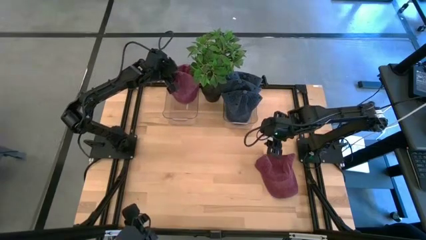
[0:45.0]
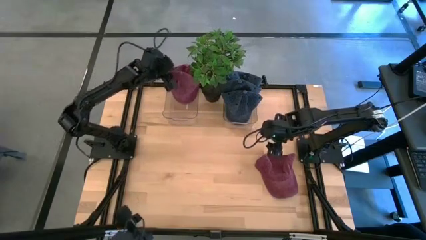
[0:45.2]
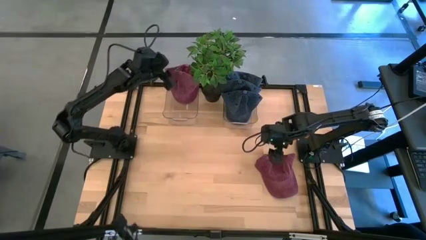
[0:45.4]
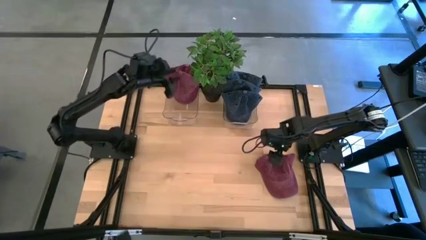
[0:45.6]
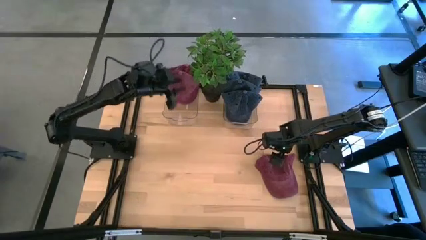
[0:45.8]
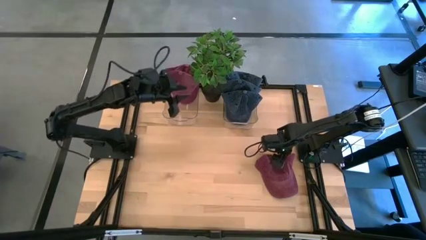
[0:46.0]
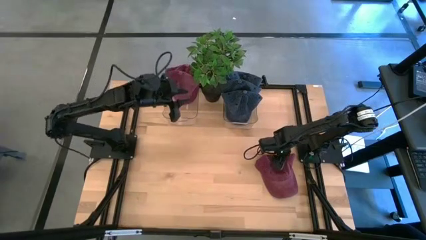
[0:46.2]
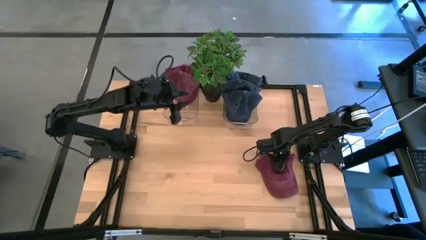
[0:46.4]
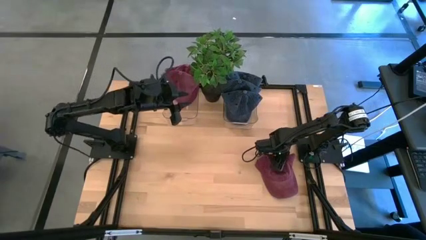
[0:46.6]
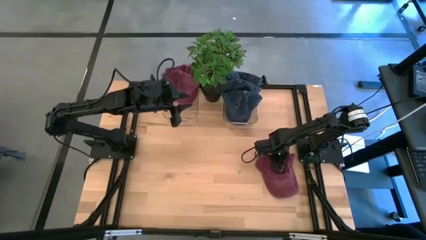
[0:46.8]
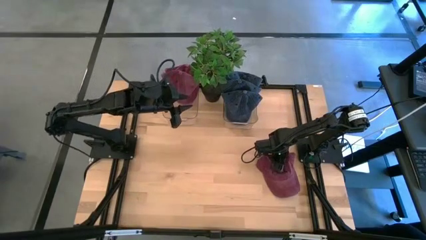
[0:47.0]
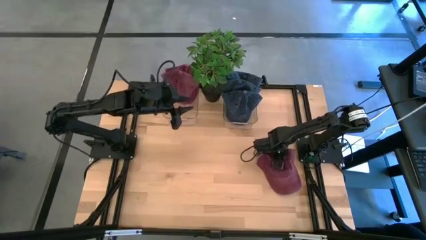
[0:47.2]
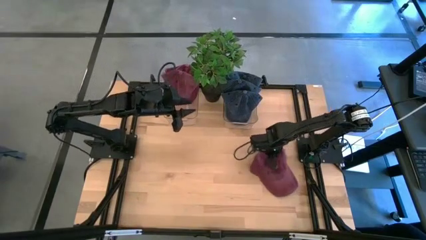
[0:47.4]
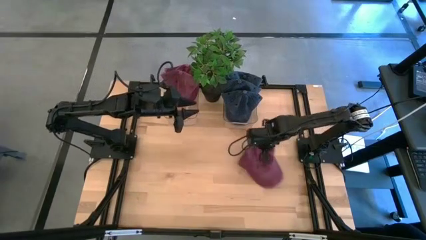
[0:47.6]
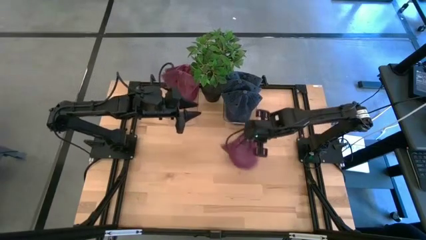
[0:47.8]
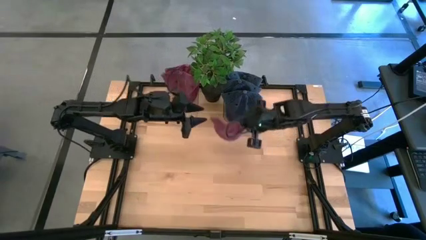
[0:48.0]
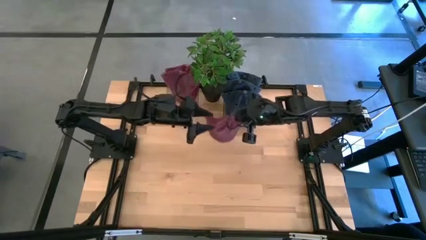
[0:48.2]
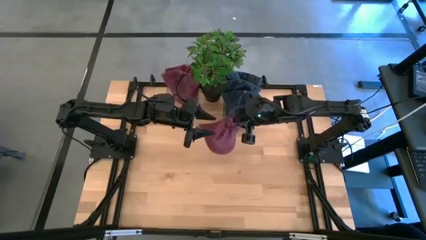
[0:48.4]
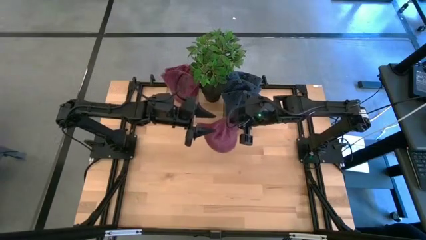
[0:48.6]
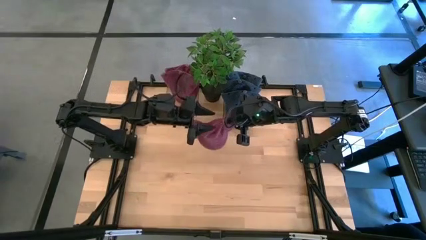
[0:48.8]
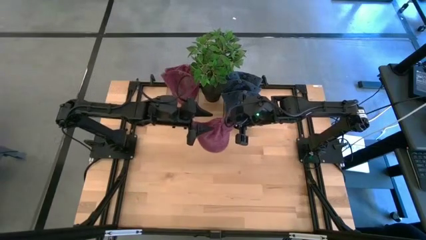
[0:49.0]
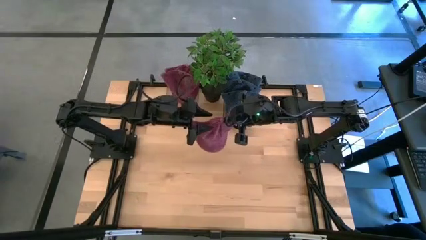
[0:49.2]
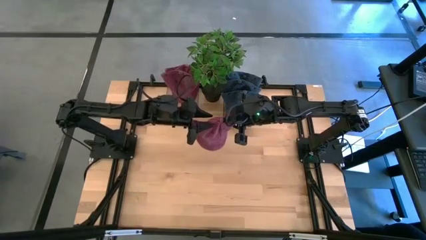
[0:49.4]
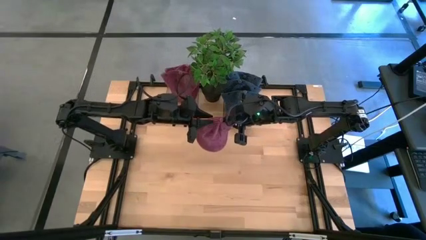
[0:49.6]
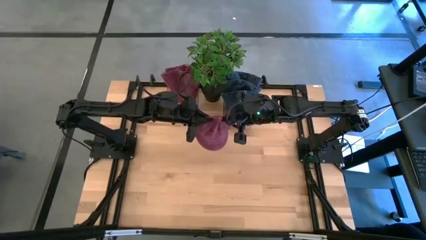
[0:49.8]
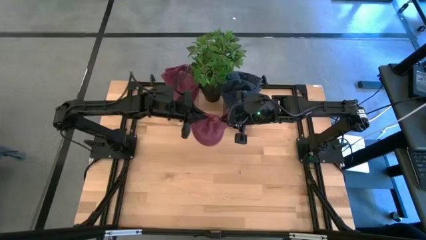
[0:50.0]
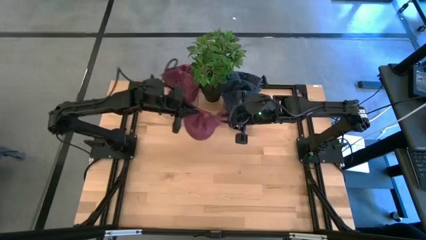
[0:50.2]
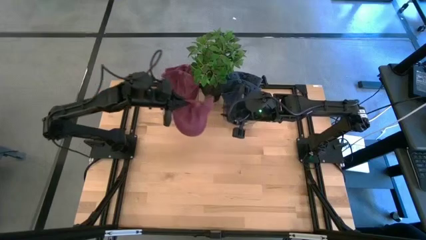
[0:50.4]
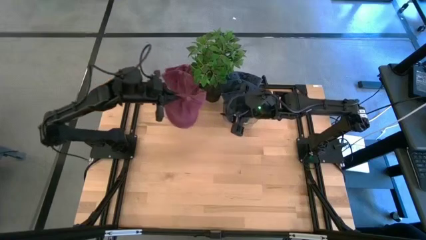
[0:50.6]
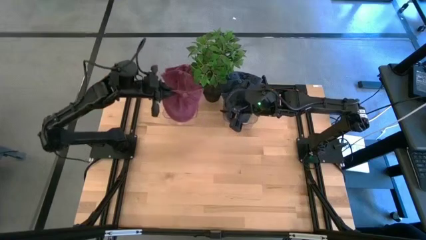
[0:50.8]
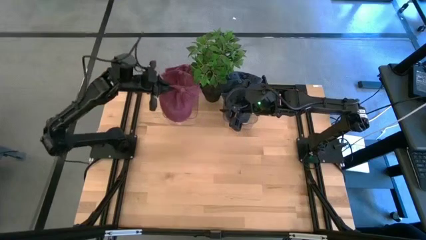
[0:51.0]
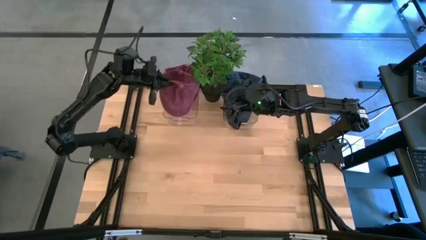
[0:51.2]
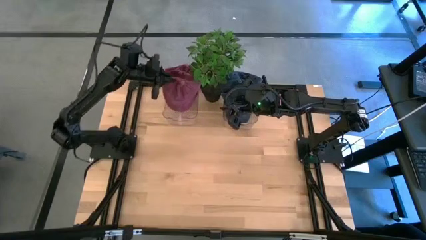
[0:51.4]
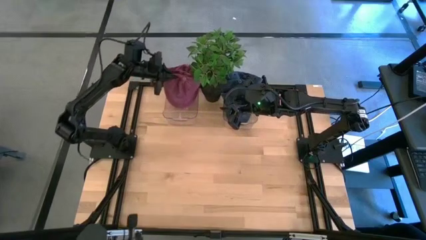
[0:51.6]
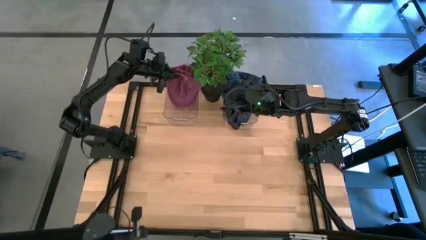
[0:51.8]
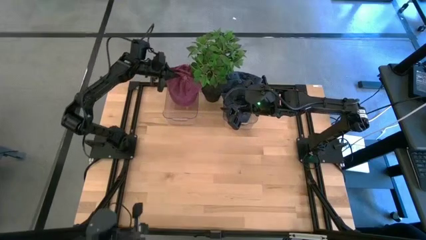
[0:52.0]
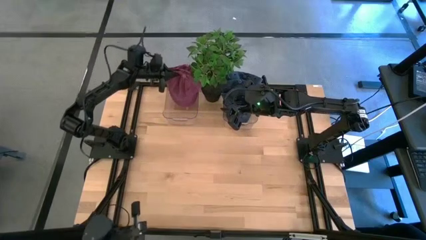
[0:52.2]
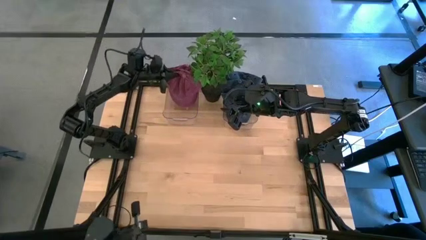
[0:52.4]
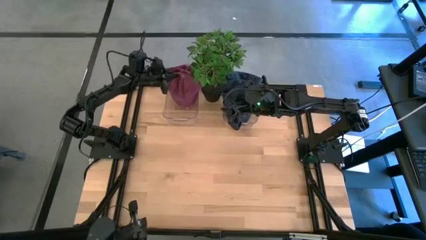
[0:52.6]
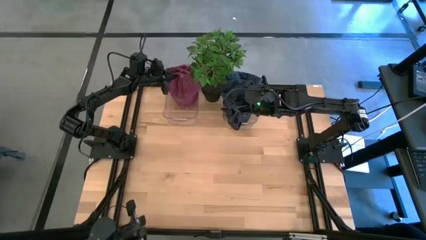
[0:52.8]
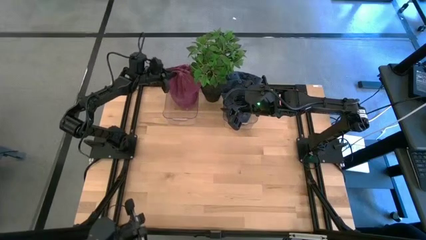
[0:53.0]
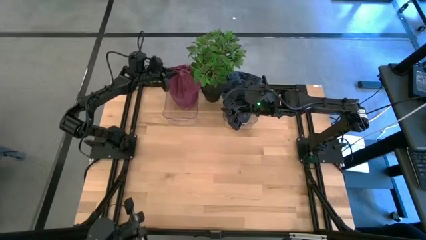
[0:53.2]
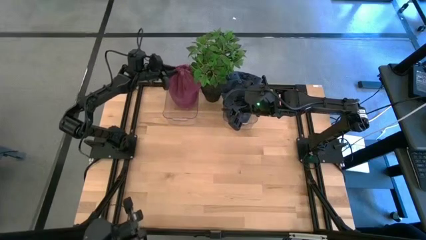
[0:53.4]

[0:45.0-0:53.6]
Task: Pick & Place hat
Put the red cap into the left transparent bin

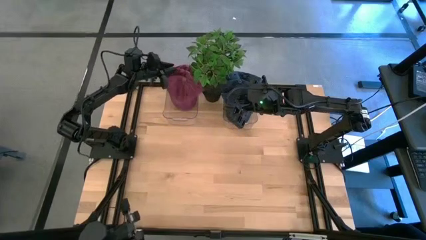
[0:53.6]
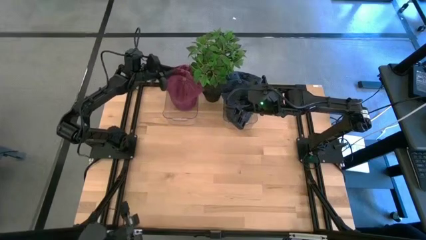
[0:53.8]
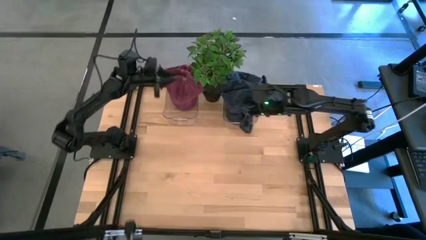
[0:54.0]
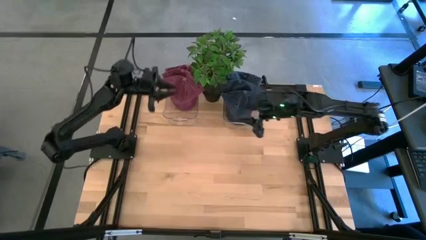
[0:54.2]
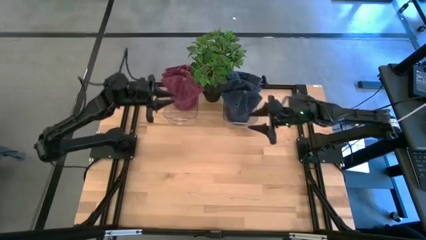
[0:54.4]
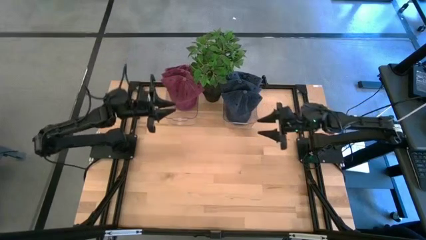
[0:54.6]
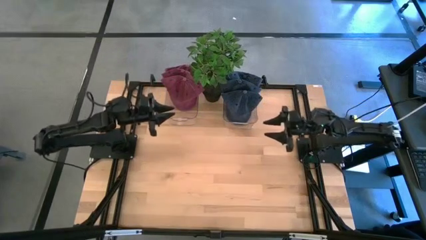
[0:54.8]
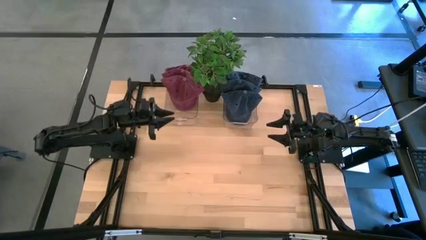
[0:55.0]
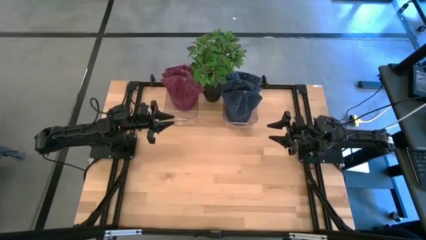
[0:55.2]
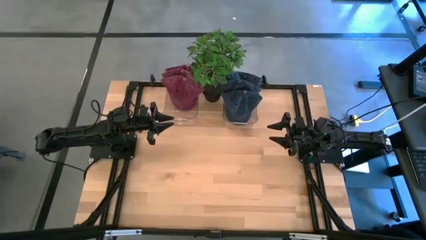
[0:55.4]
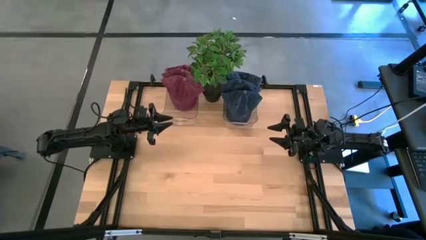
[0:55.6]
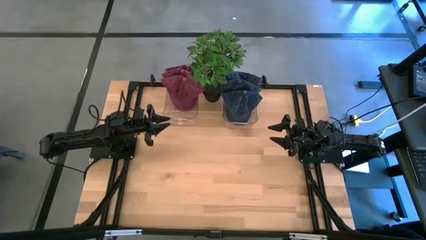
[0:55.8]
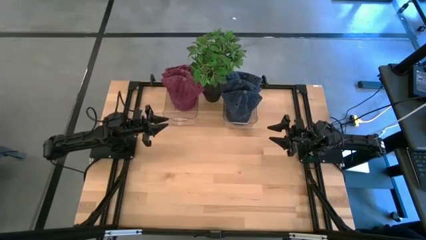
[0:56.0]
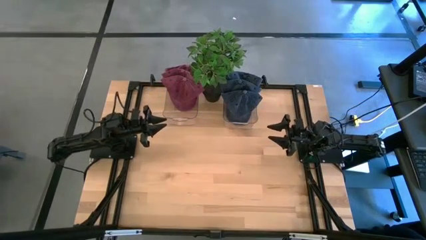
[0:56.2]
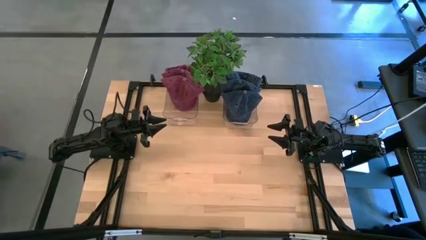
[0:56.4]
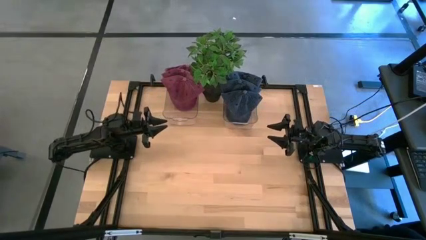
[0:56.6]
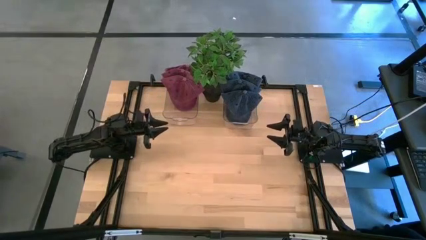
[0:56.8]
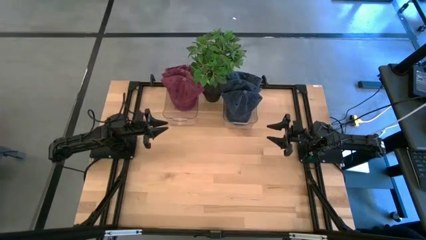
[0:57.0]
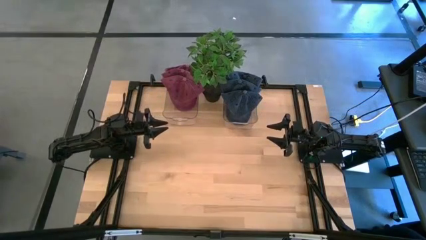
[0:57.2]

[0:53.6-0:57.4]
Return to Home Position
